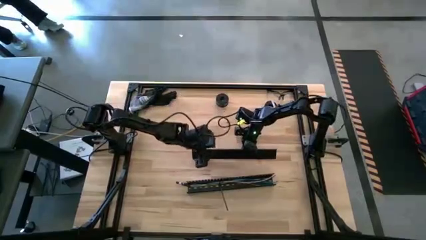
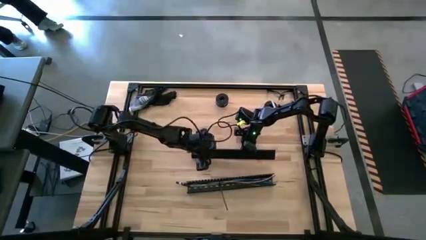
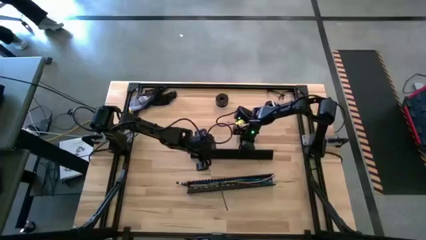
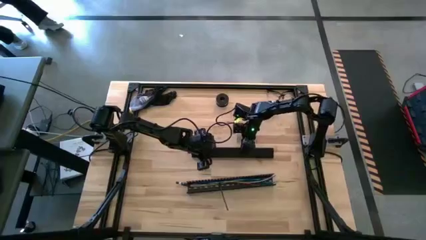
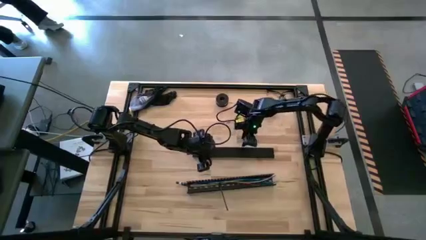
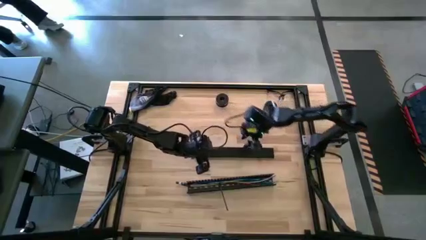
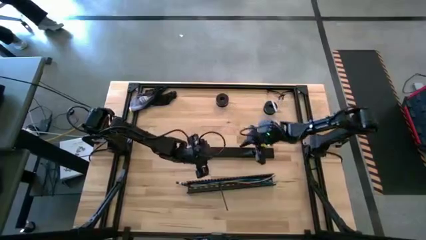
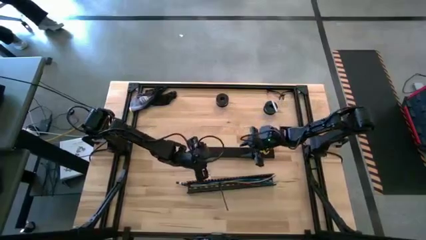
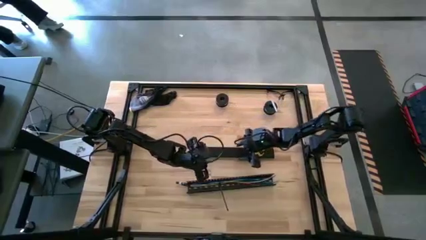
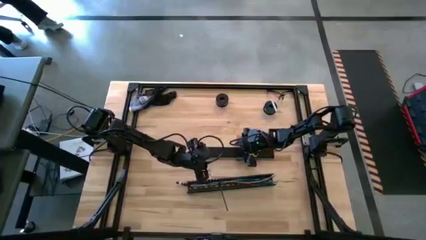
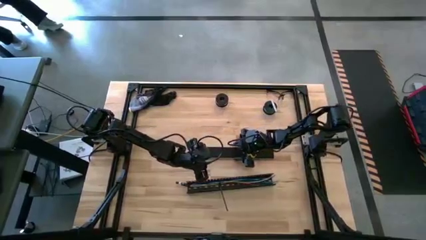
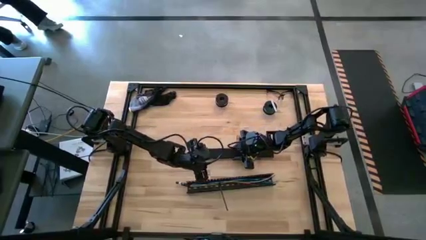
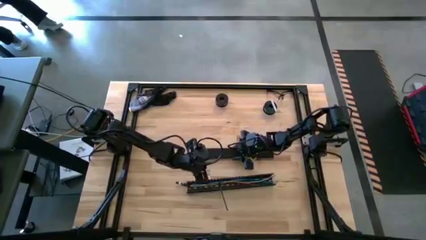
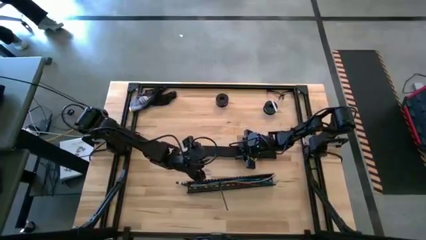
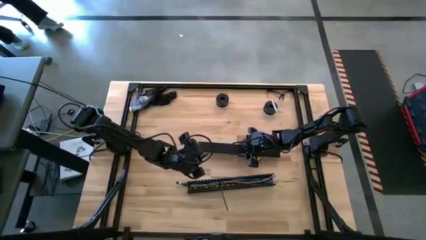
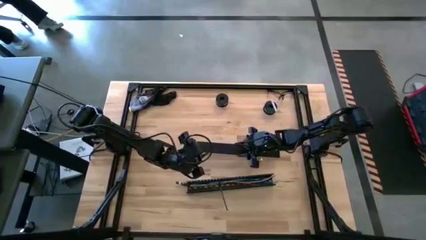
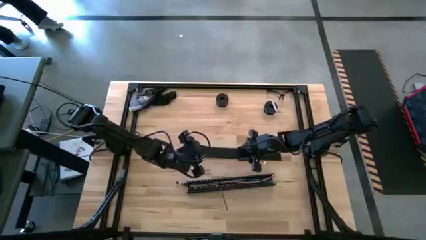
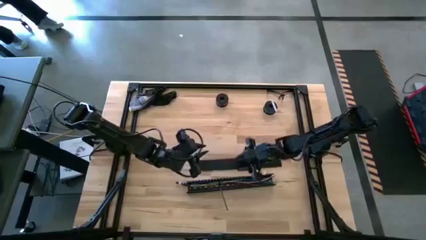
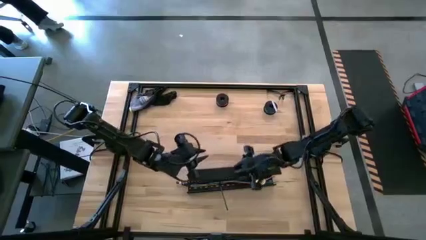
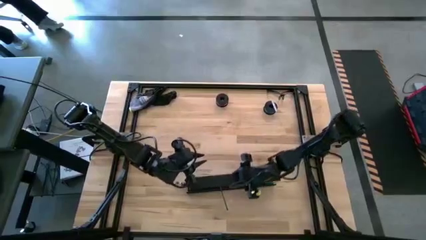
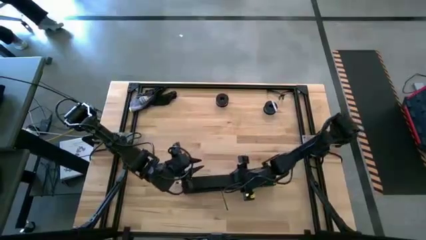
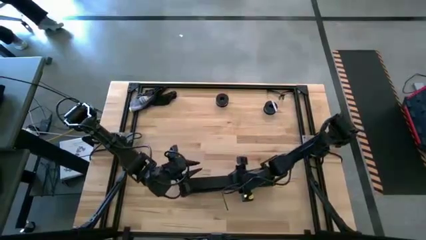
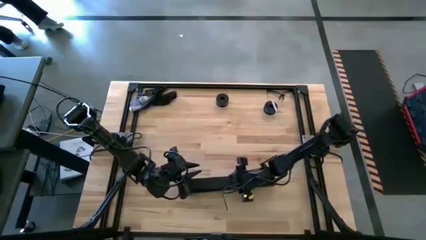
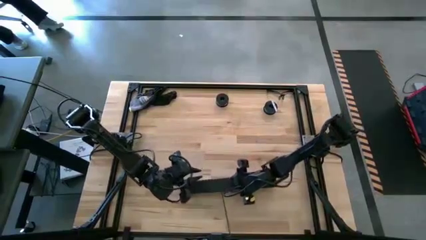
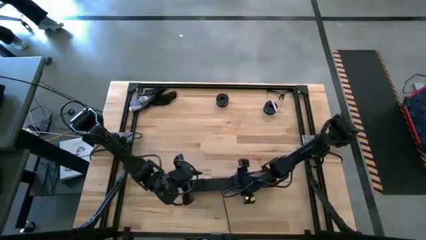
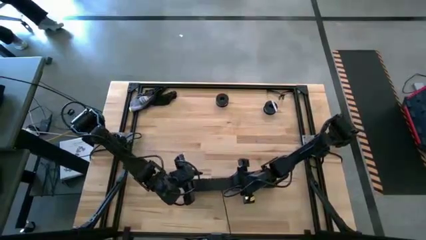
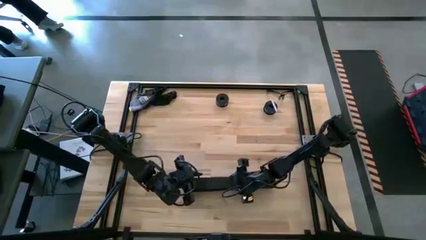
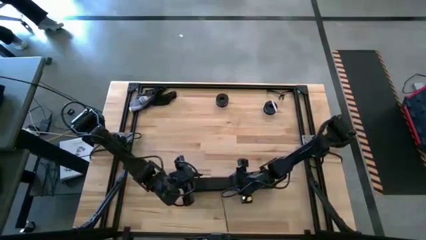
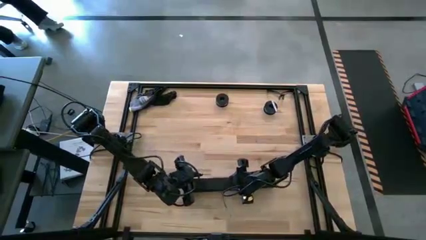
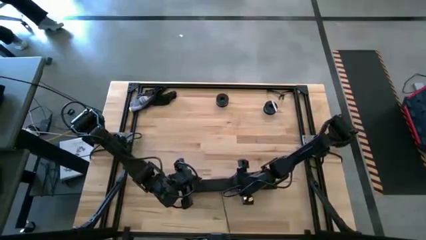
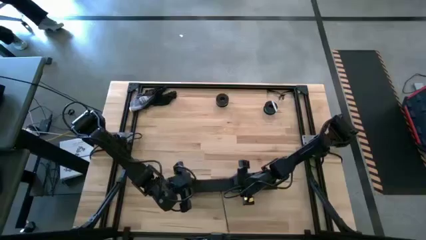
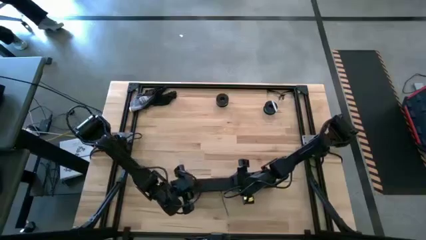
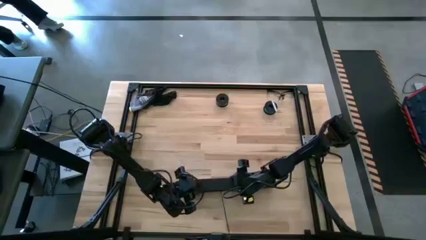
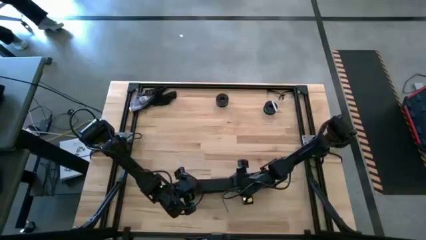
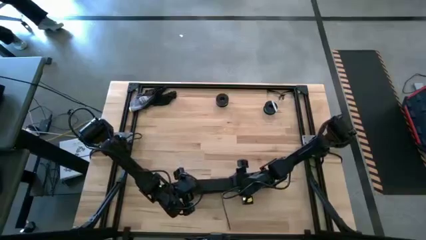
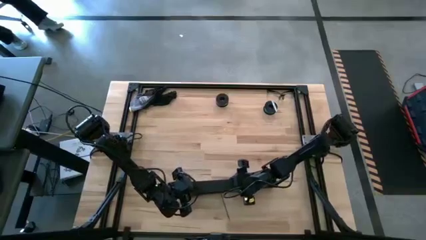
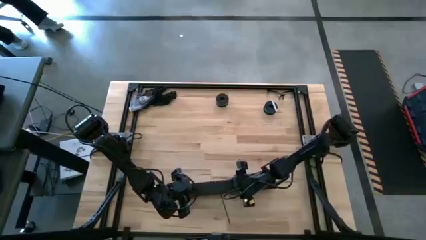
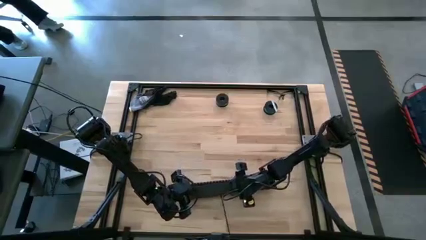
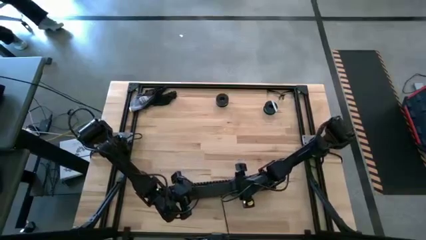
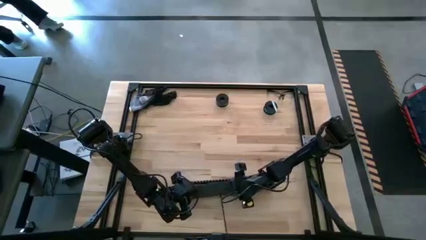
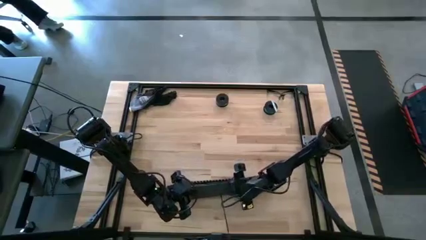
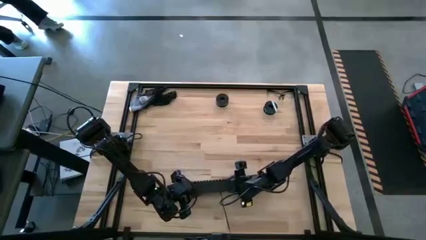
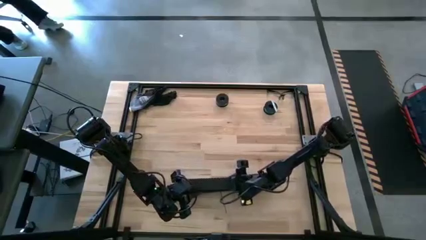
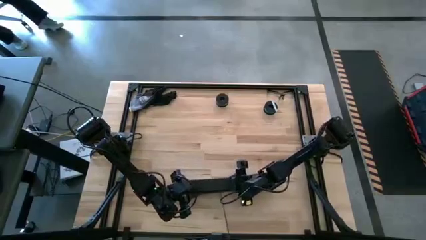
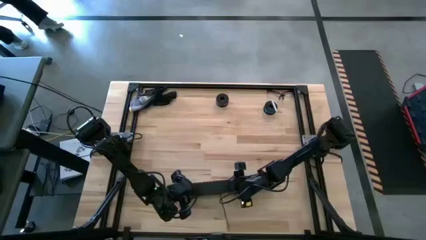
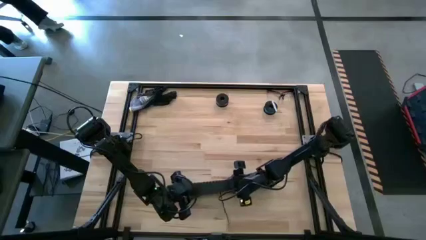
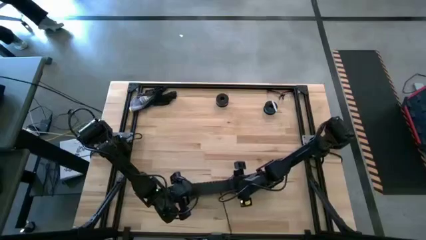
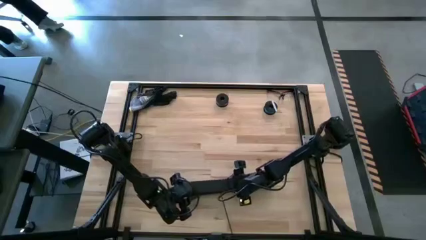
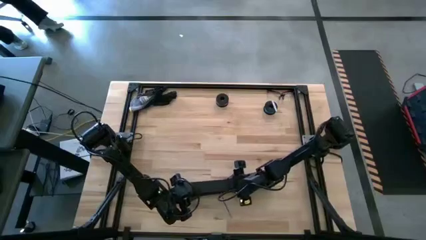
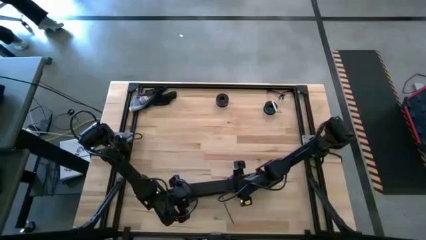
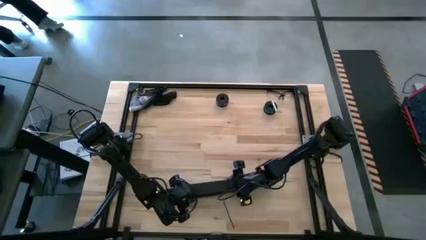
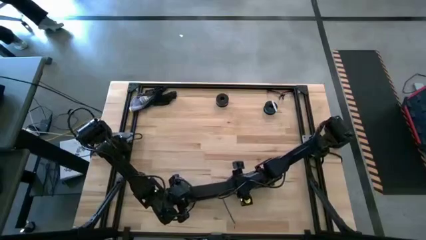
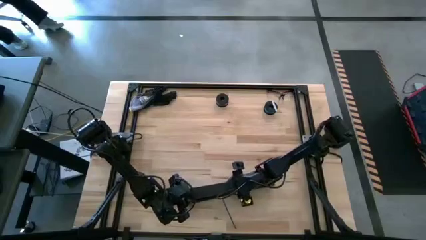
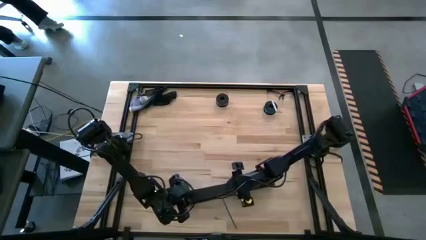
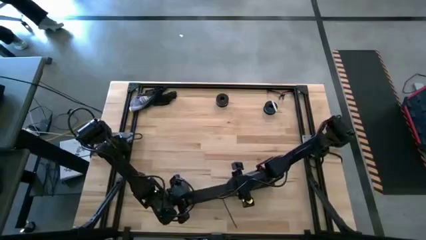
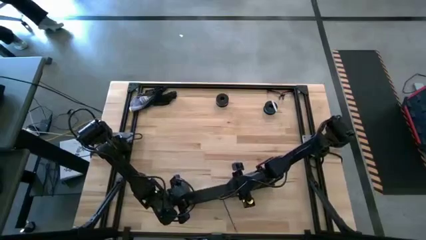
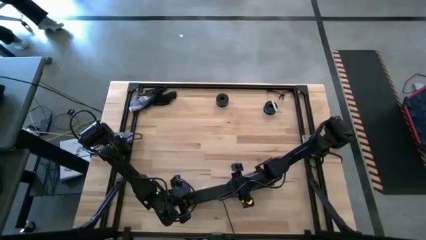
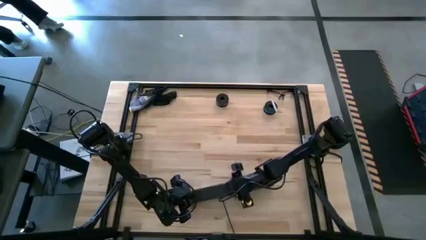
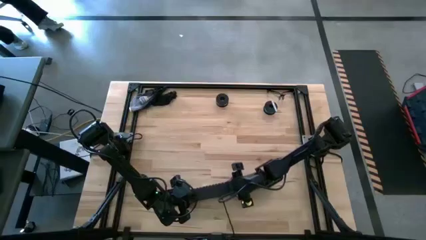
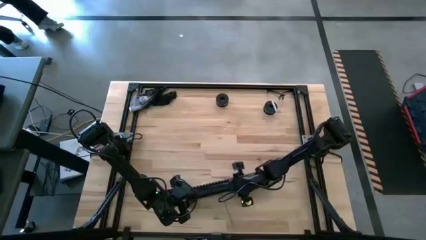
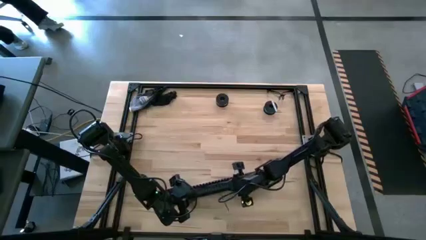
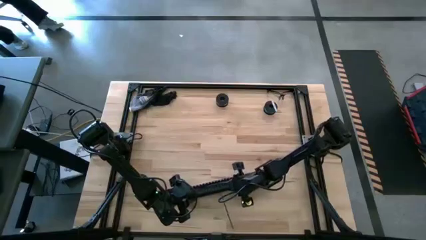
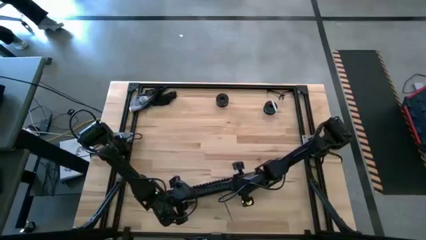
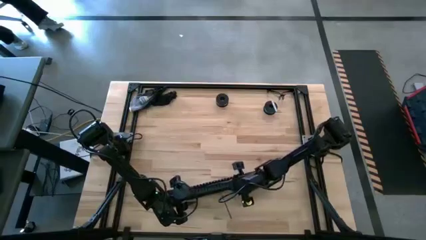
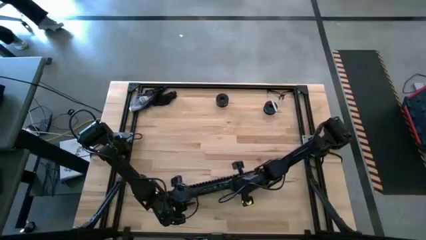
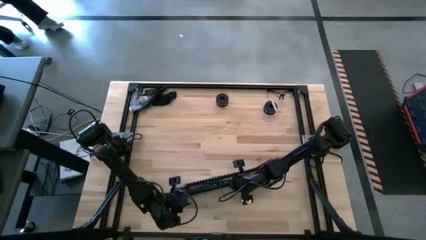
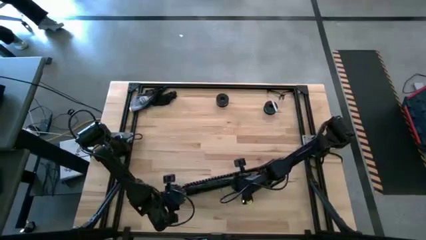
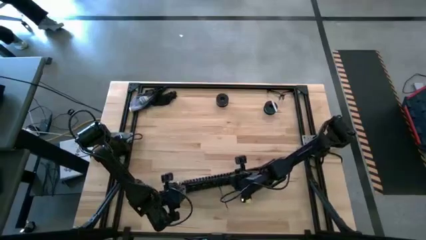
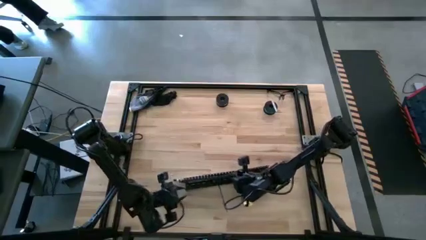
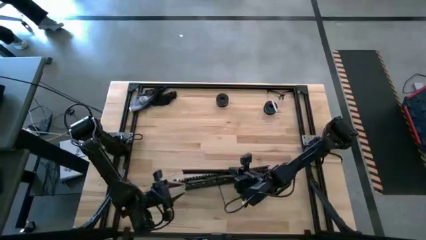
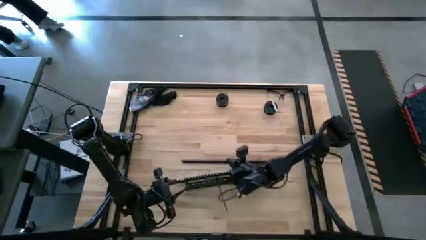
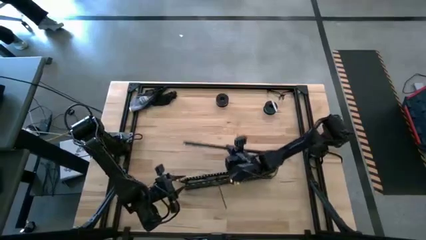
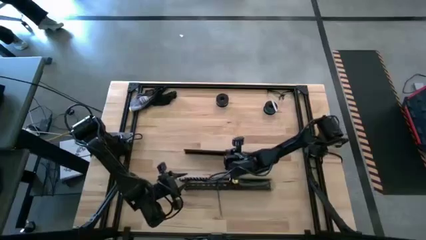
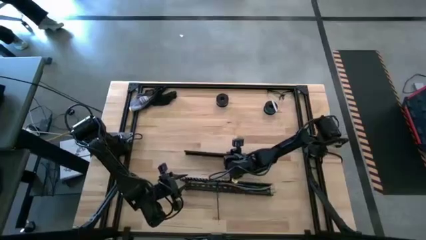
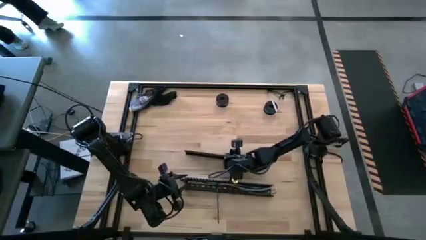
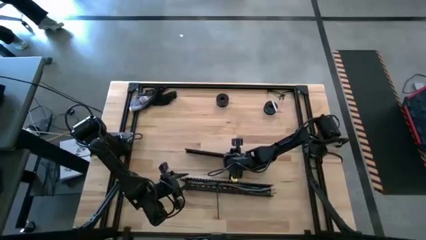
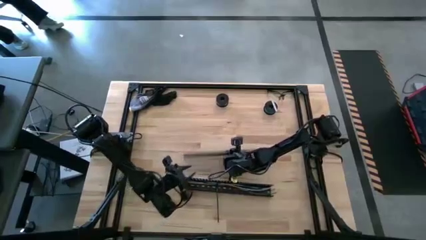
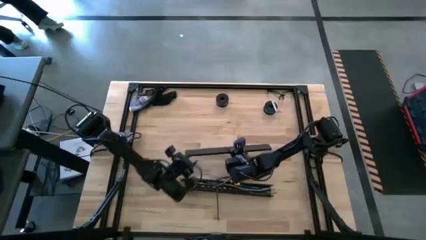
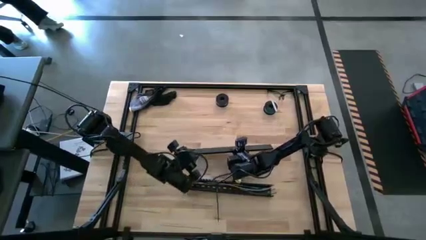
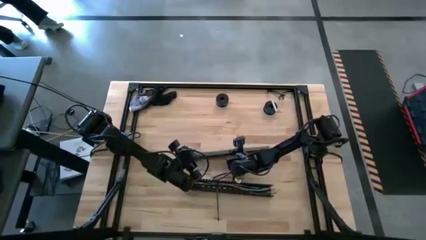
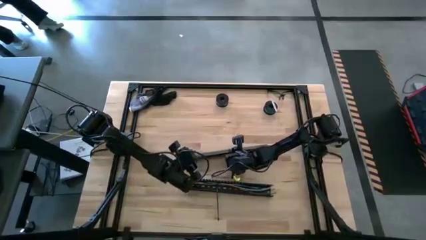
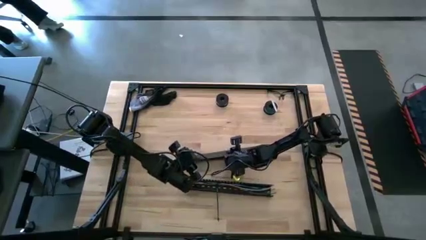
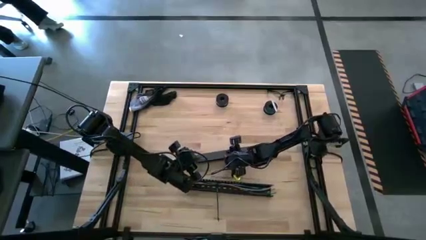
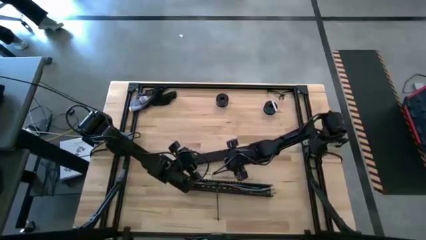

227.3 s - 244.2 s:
Task: Ziptie cables
Close the black cable duct
